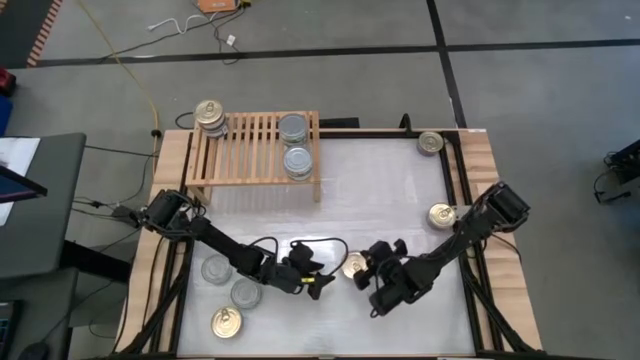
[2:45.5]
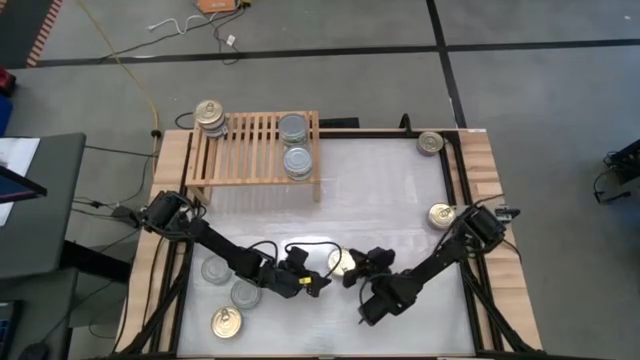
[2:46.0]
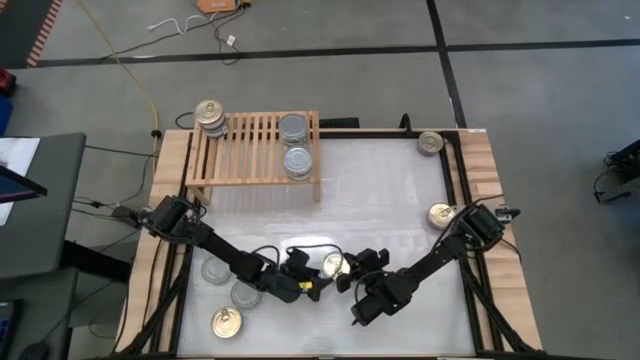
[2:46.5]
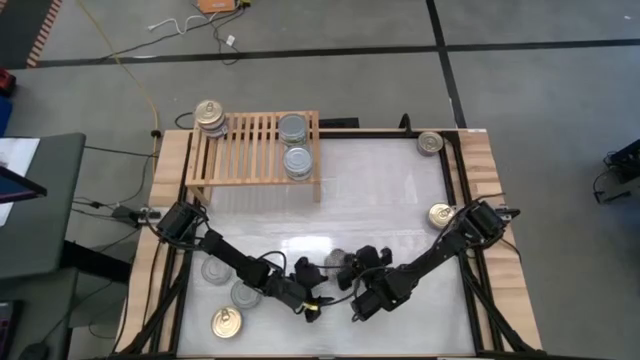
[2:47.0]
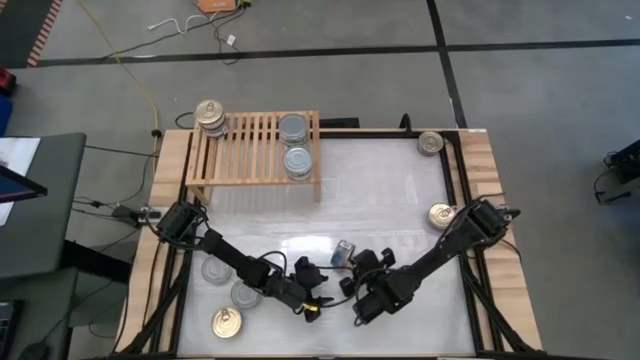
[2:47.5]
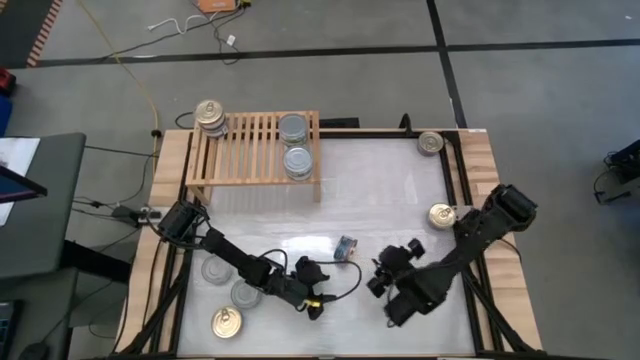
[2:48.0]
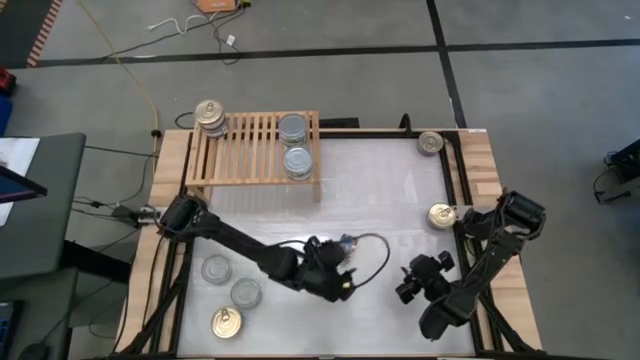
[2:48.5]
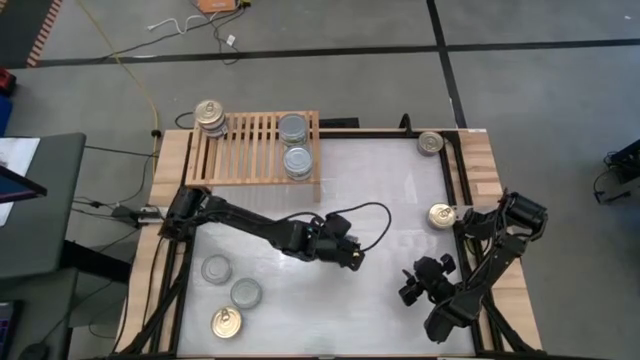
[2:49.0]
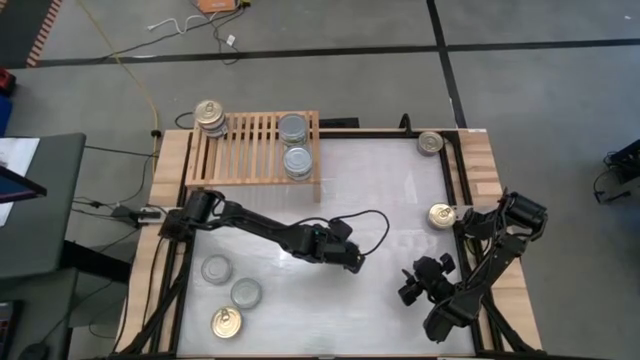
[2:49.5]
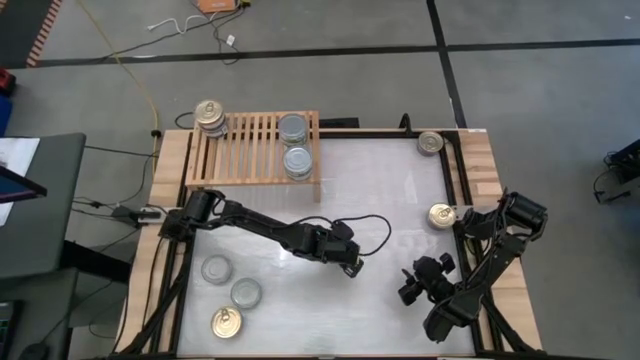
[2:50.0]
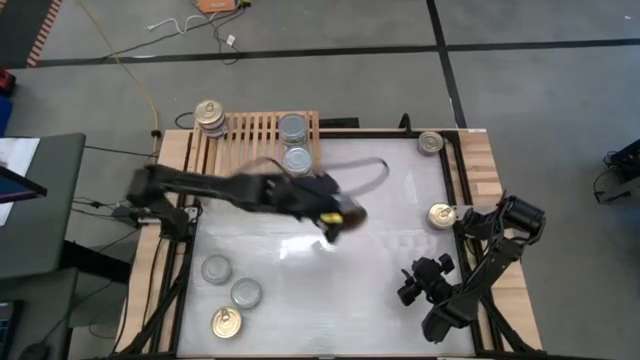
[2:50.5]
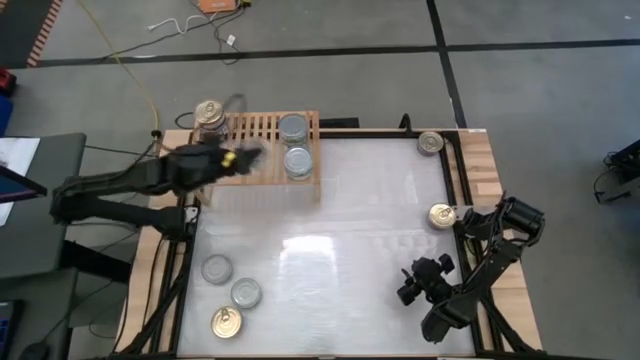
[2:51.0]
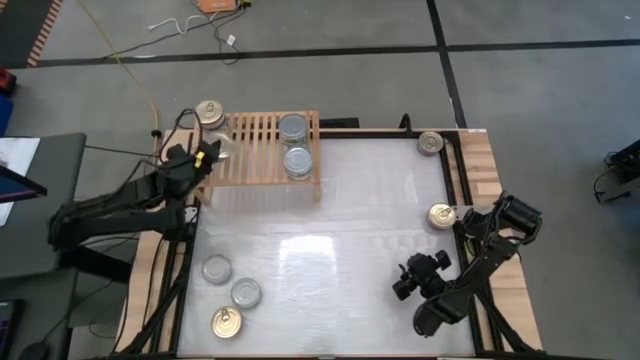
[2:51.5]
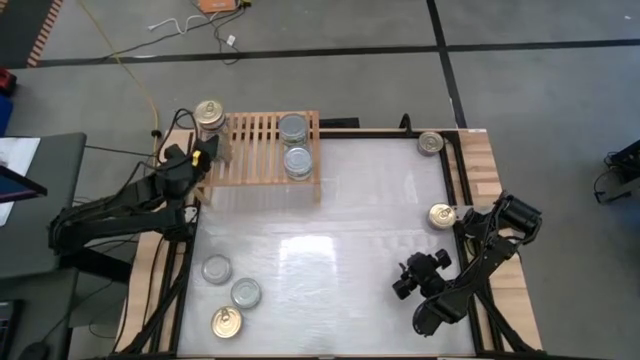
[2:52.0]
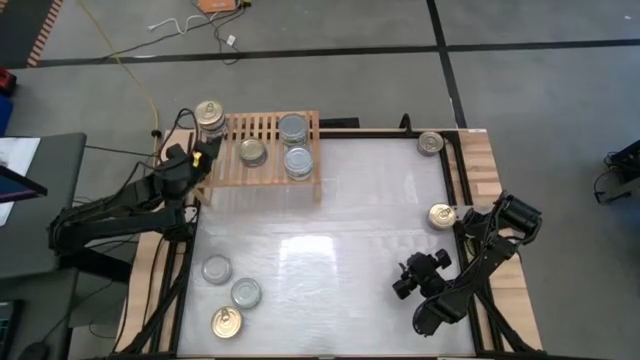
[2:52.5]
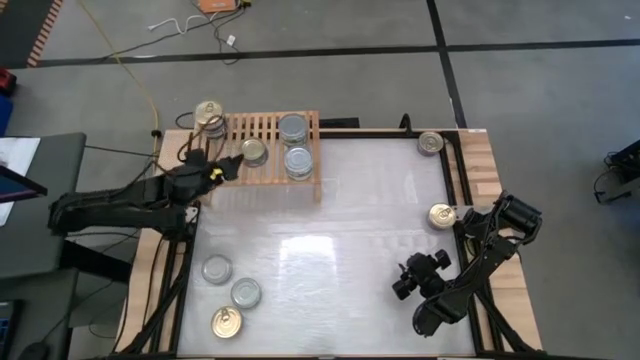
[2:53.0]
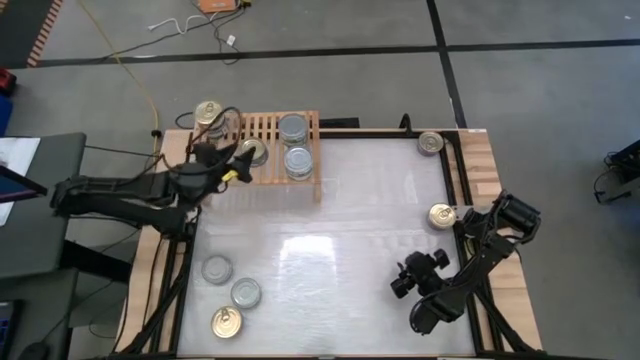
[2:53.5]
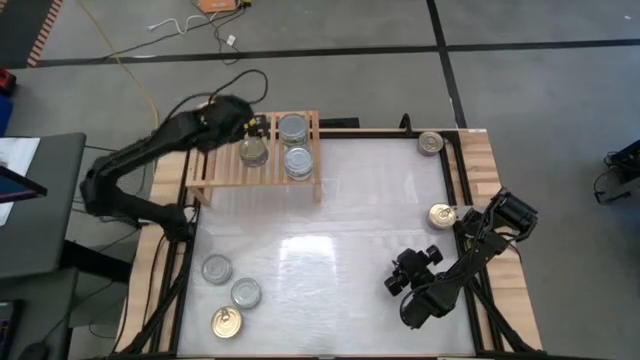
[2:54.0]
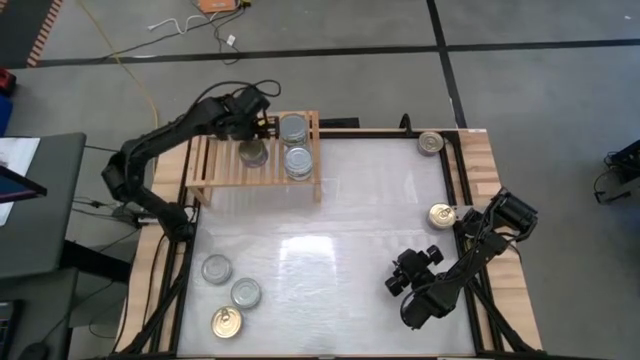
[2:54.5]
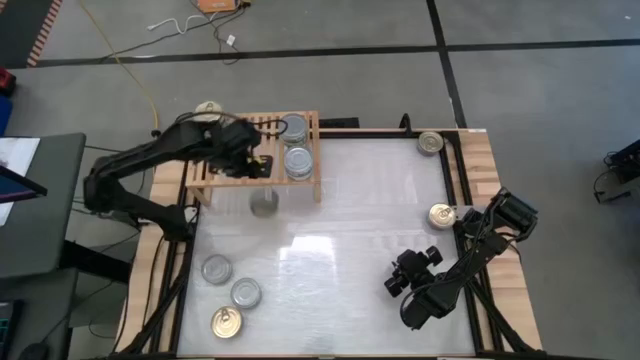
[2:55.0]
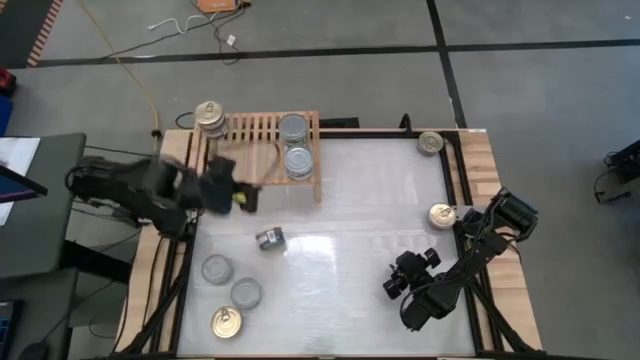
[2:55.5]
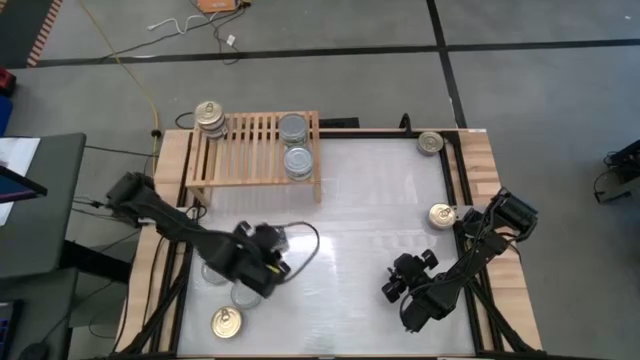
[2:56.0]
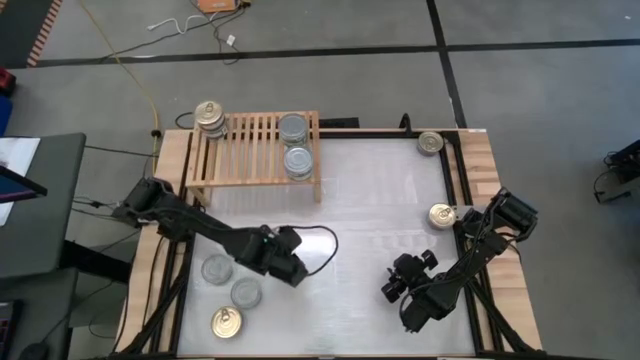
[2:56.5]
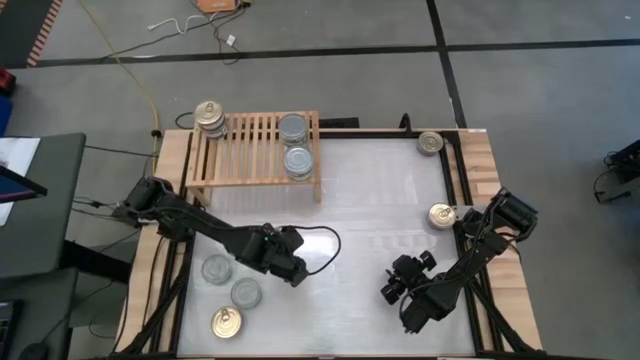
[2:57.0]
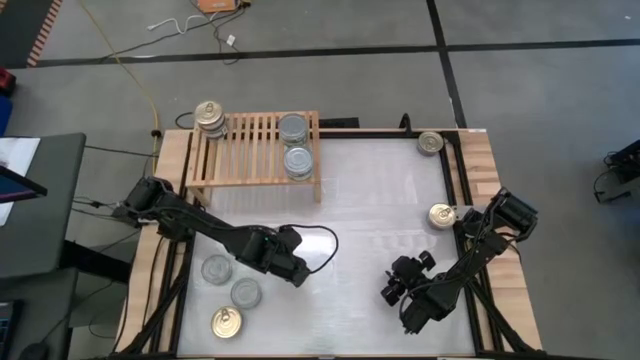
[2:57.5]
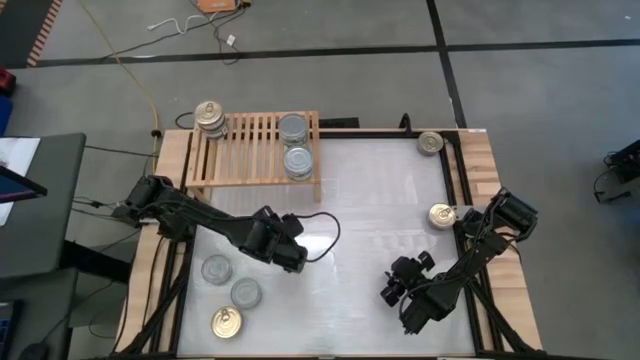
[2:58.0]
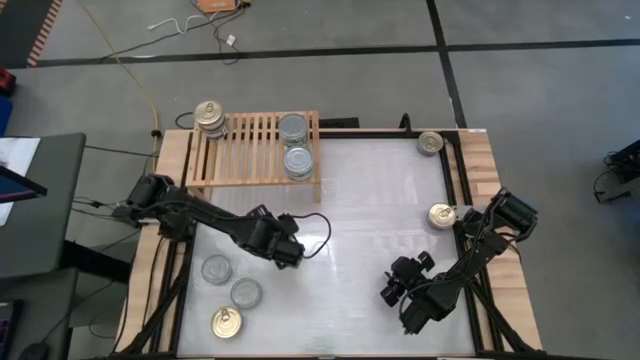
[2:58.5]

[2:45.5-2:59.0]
Task: Stack canned seafood by type on shelf
Put the blue tuna can on the shelf

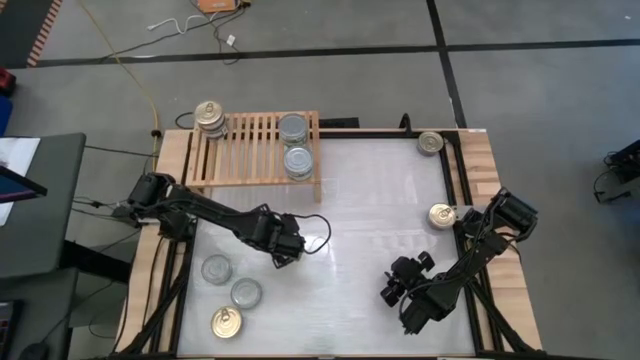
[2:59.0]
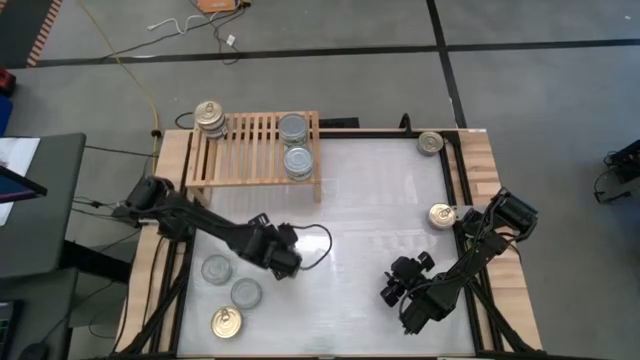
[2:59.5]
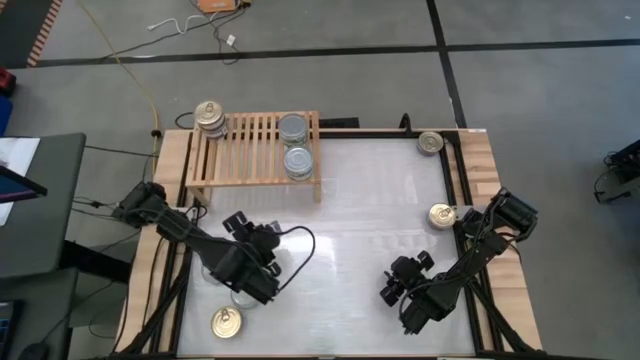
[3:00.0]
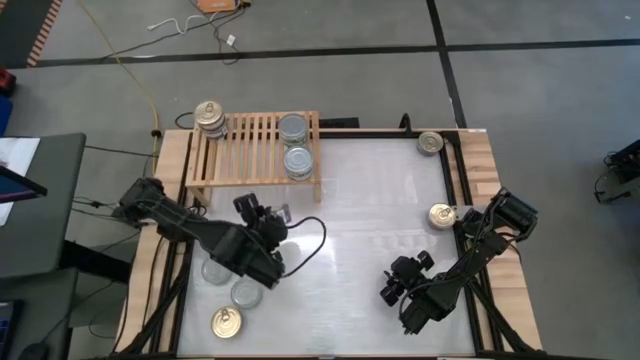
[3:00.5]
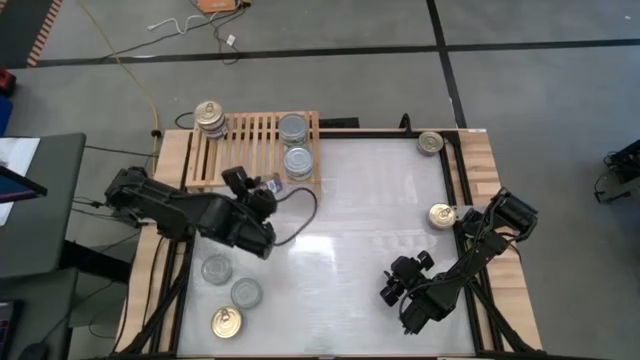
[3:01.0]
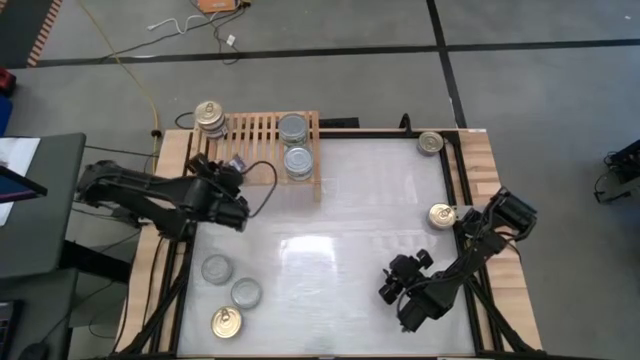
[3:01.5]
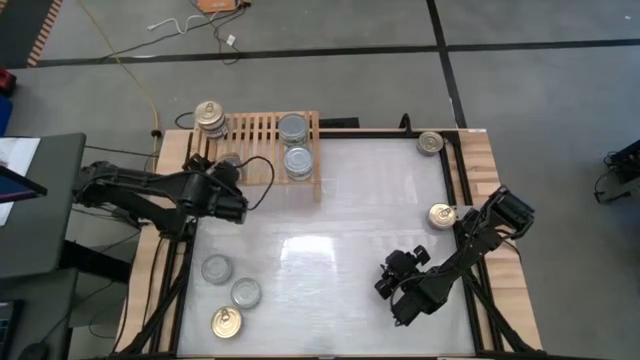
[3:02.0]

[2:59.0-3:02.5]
Put the blue tuna can on the shelf

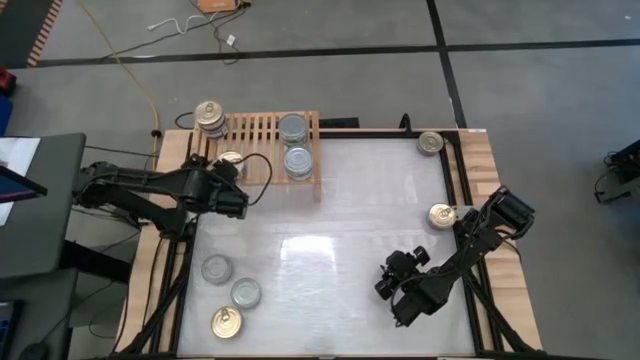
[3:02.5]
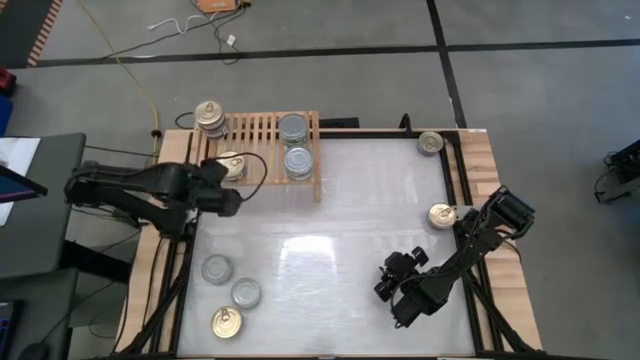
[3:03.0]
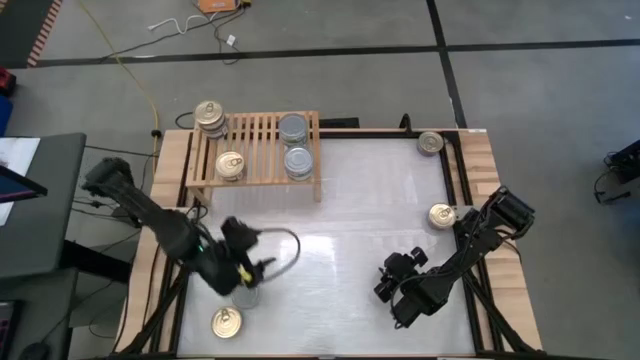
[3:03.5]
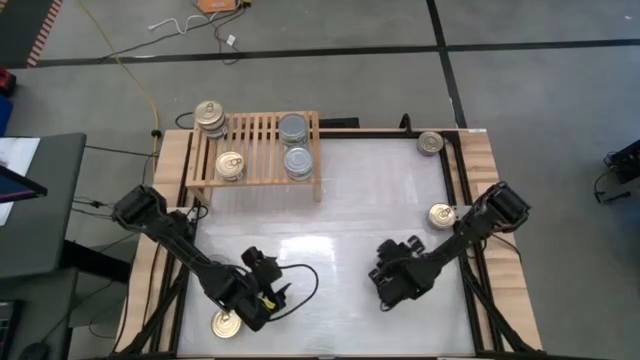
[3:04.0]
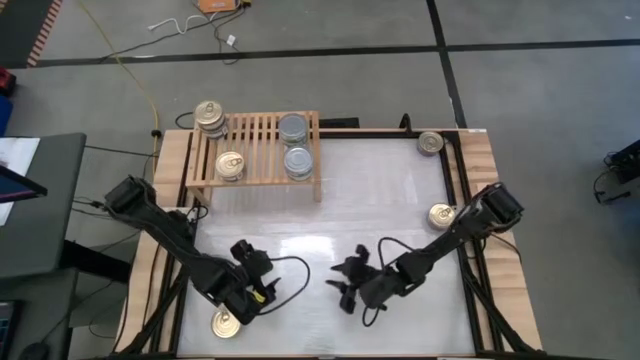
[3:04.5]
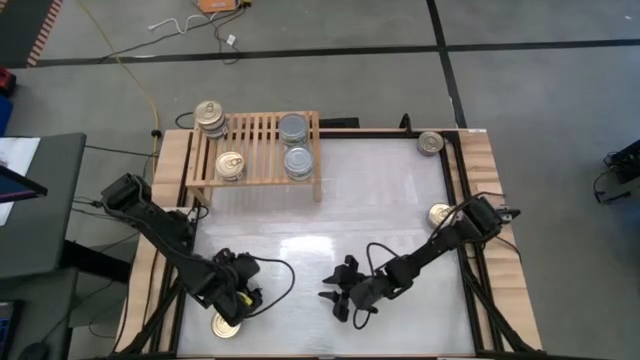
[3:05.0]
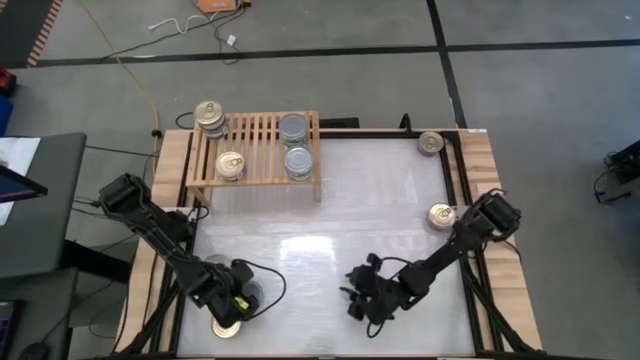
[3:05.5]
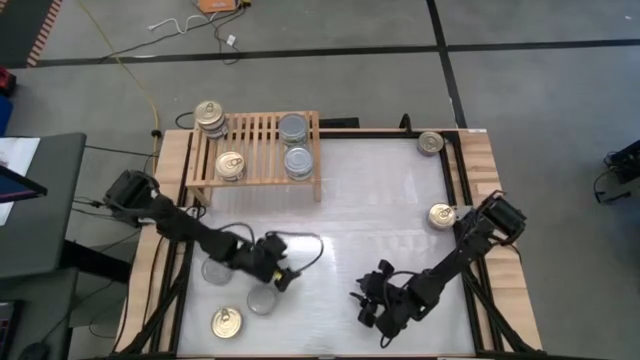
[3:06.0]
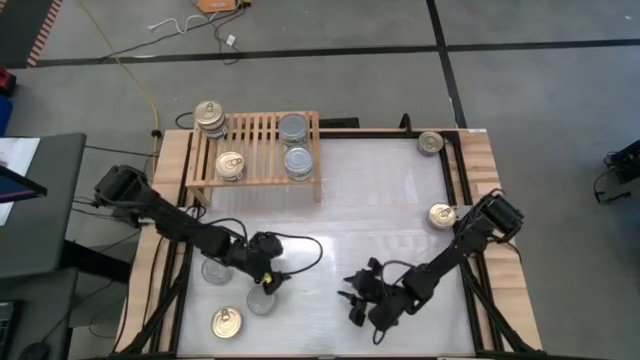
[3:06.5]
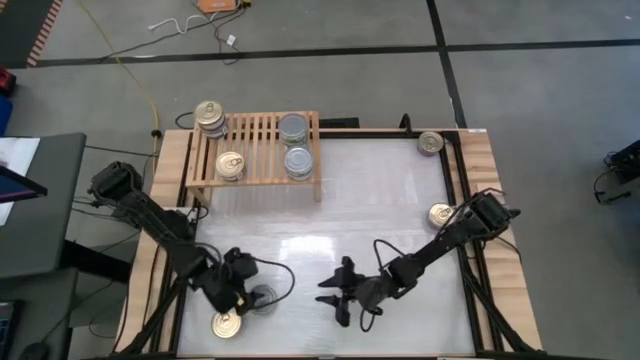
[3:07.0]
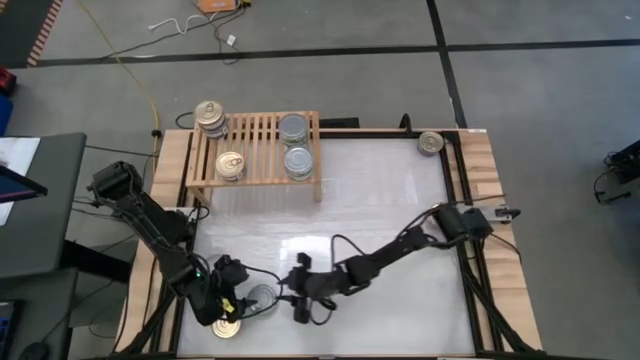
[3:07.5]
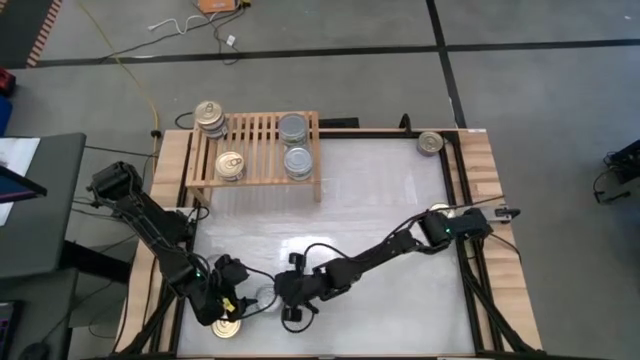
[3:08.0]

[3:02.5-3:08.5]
Put the green tuna can on the shelf
